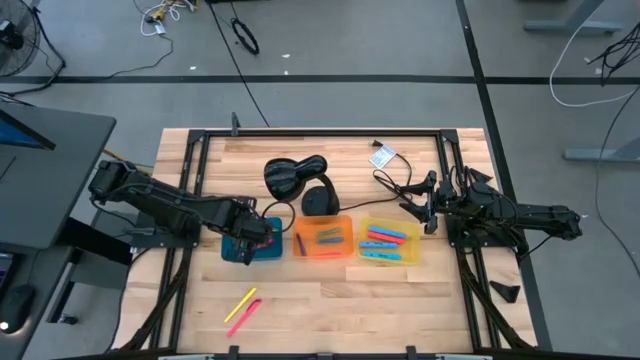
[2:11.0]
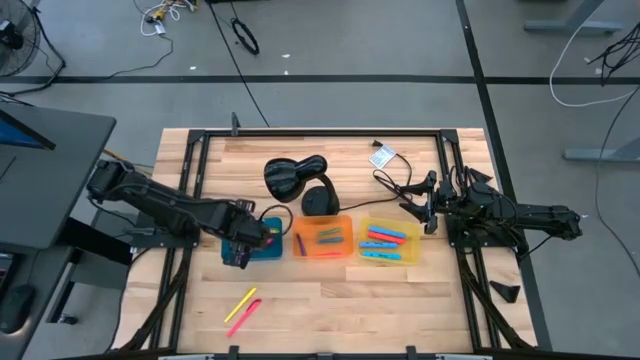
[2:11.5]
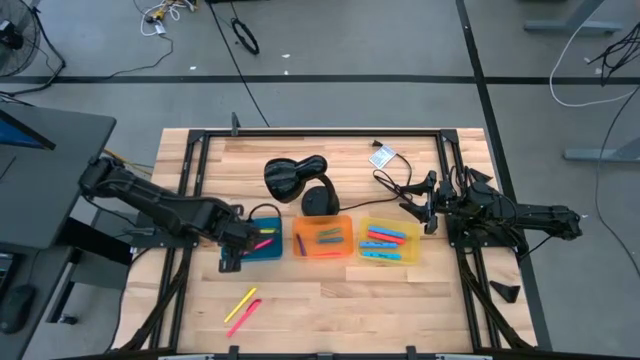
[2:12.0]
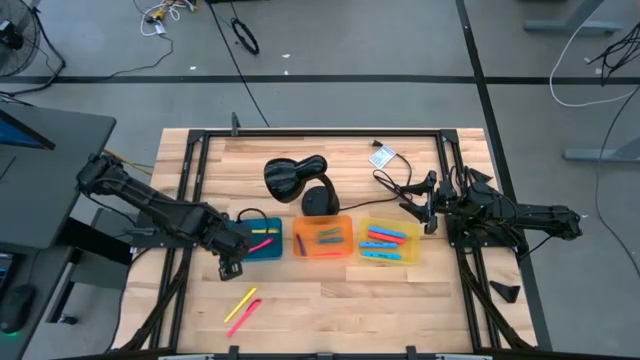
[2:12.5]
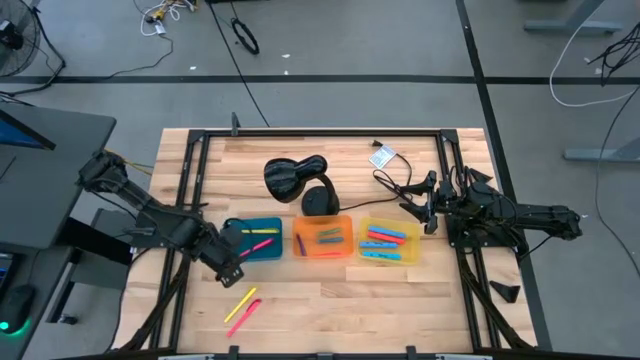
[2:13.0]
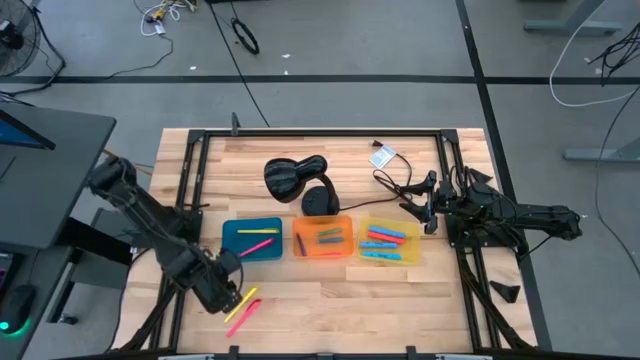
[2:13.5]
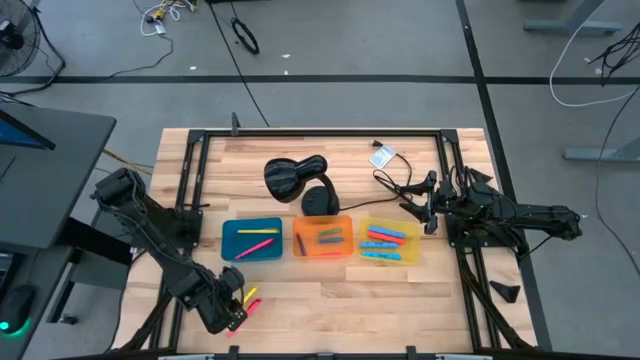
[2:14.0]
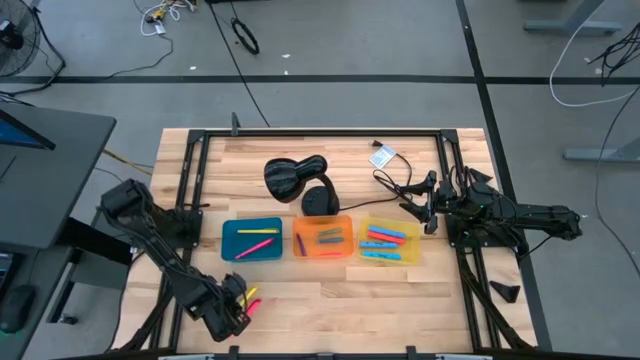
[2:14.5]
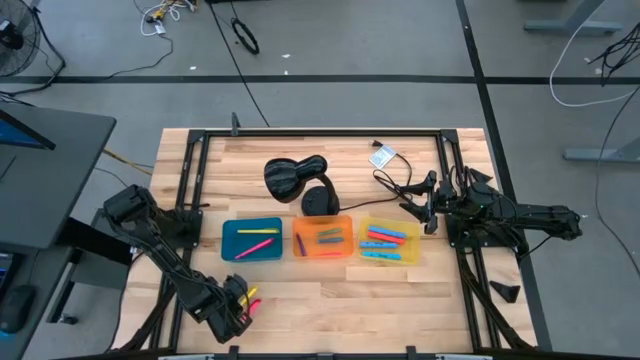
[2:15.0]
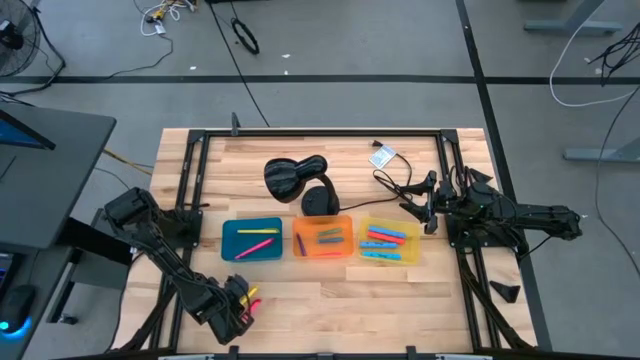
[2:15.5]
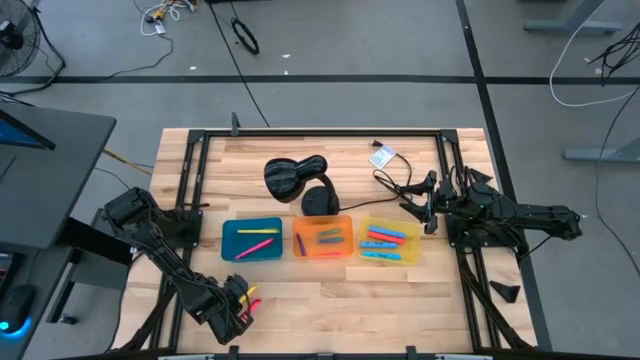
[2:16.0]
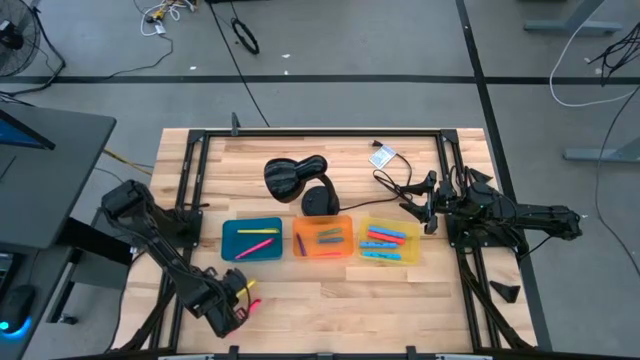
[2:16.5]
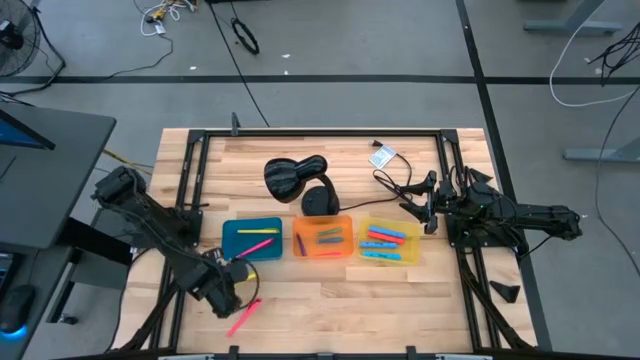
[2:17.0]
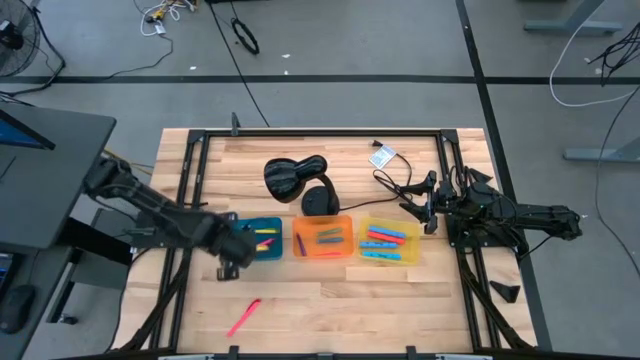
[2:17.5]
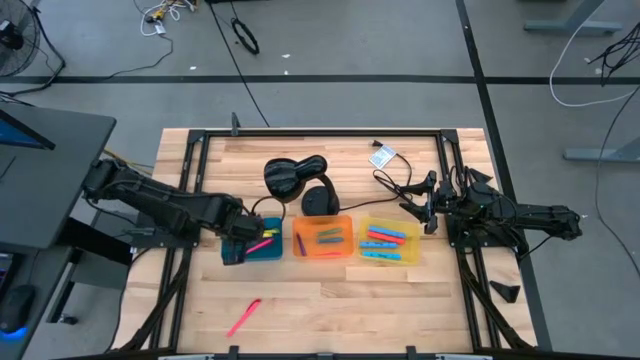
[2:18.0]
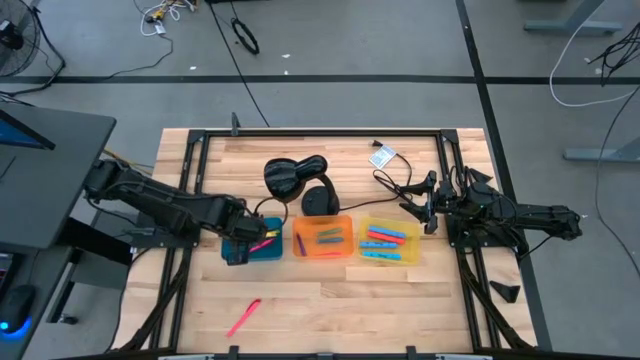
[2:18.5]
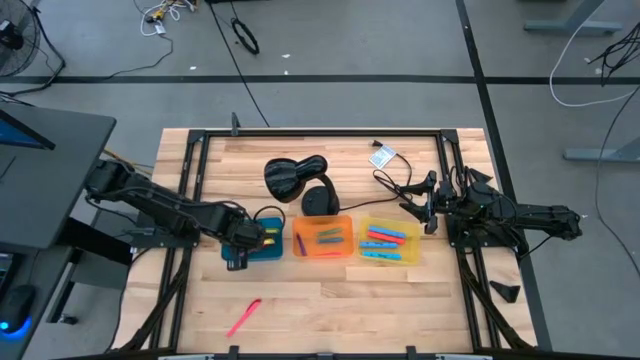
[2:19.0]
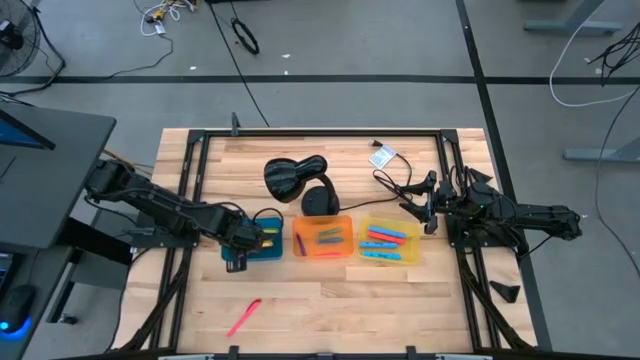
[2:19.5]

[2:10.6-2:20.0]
Task: Pick & Place Markers
Put the yellow pen into the blue bin

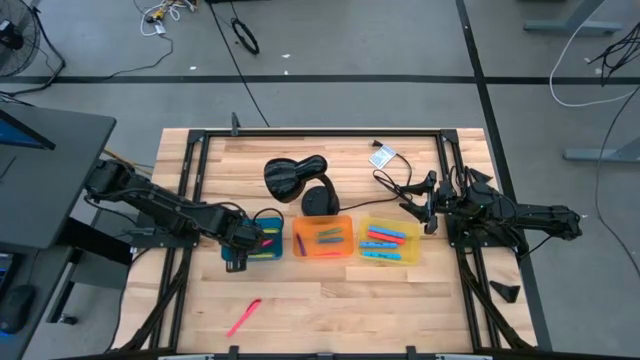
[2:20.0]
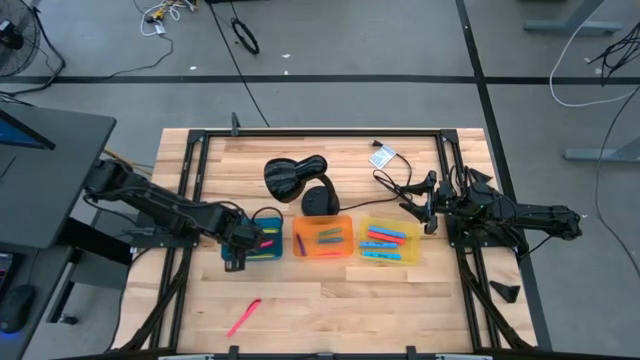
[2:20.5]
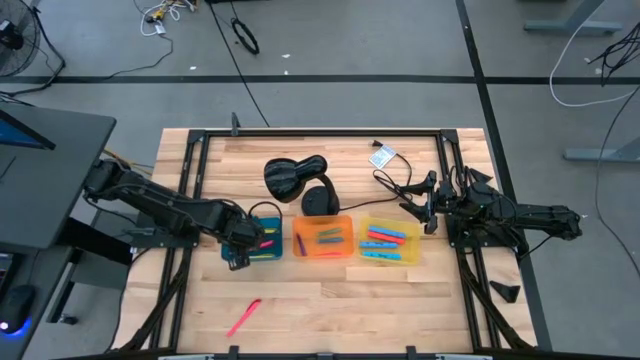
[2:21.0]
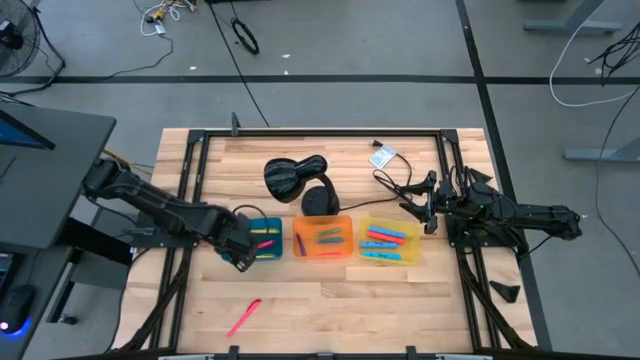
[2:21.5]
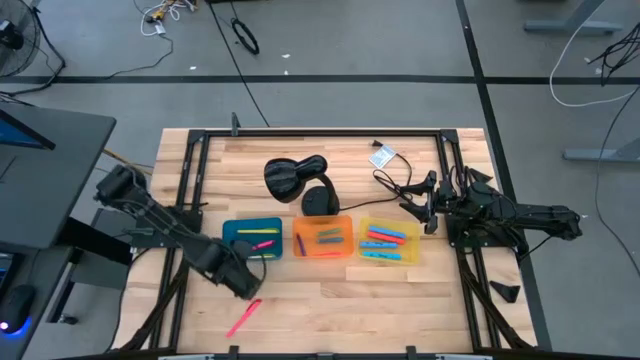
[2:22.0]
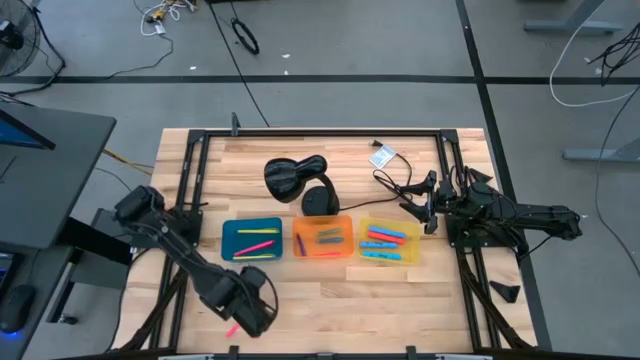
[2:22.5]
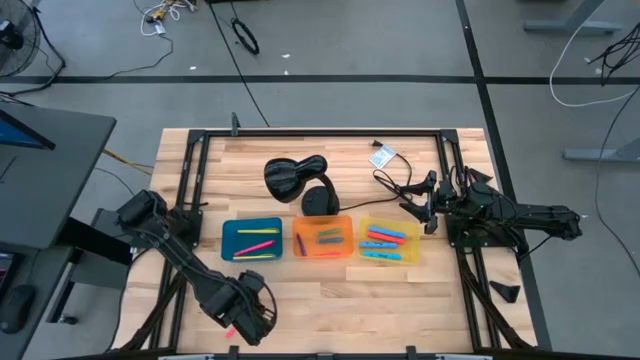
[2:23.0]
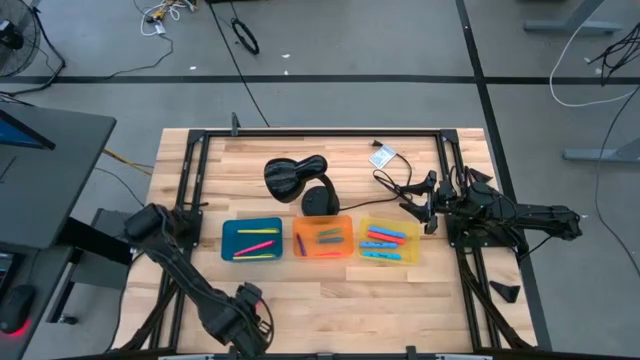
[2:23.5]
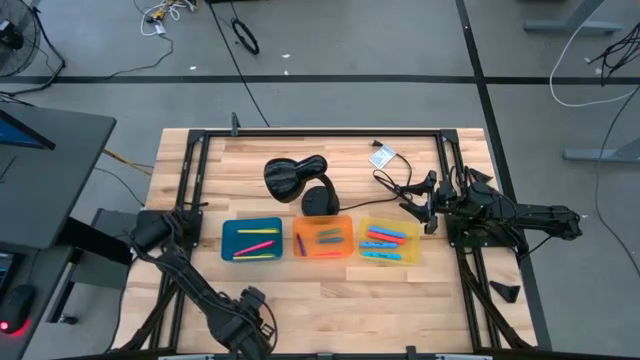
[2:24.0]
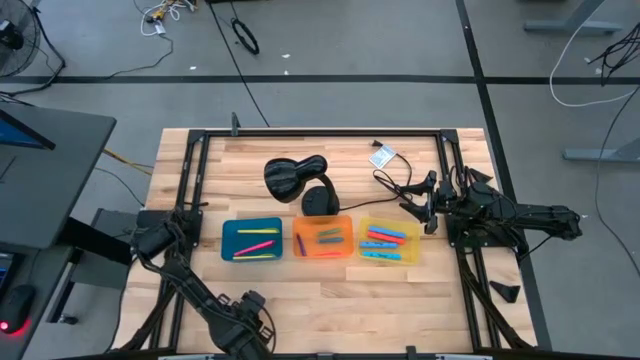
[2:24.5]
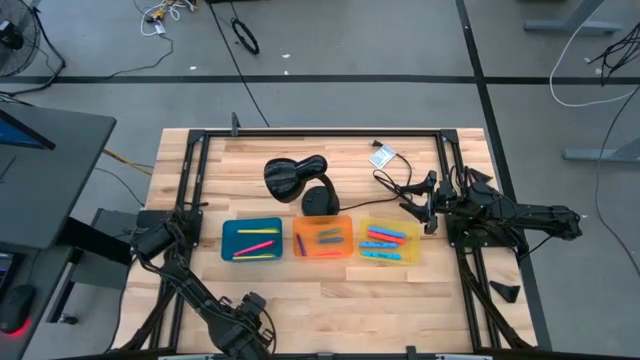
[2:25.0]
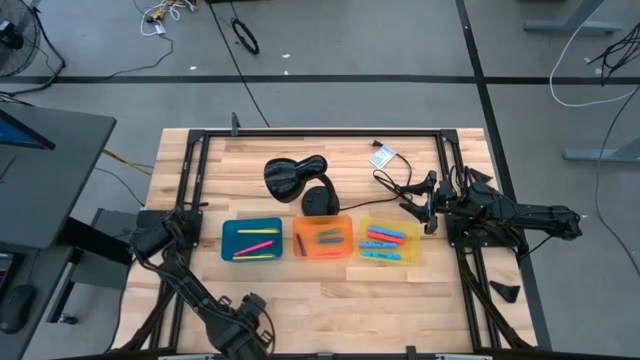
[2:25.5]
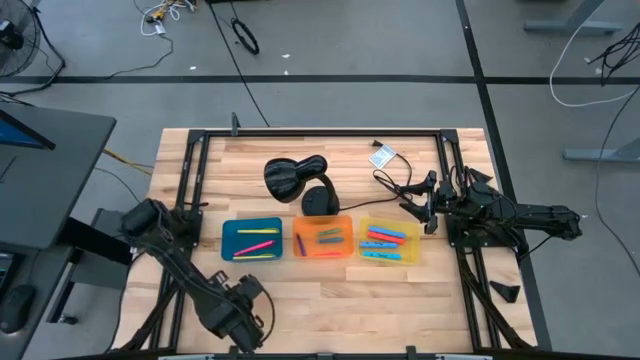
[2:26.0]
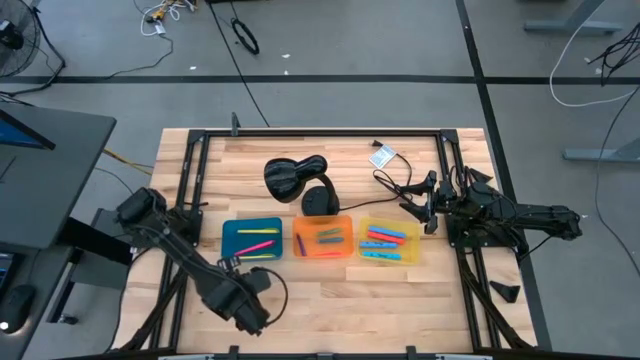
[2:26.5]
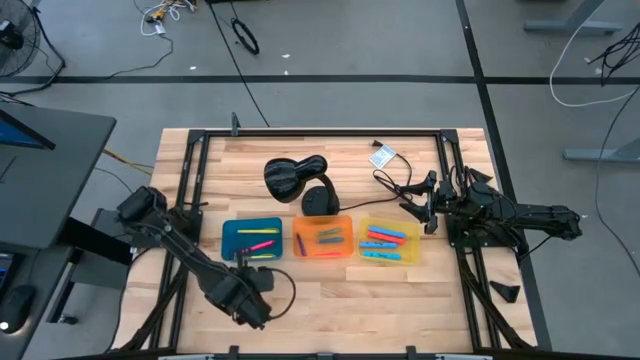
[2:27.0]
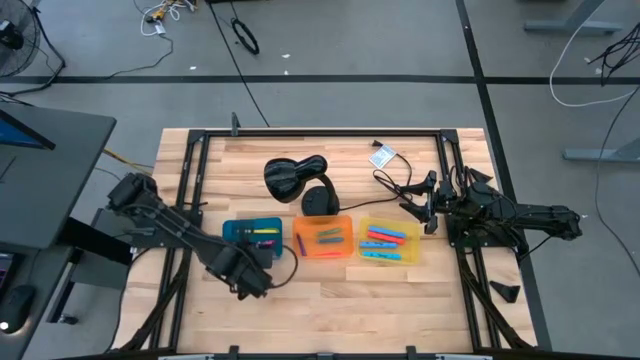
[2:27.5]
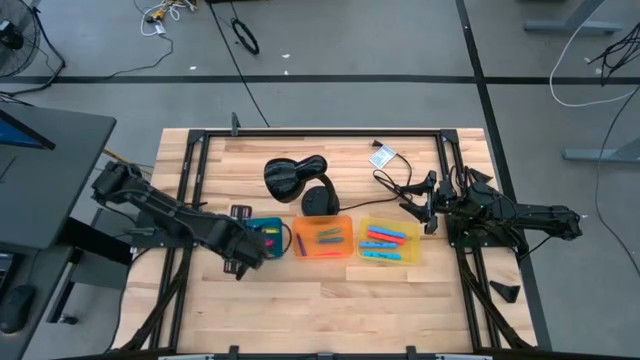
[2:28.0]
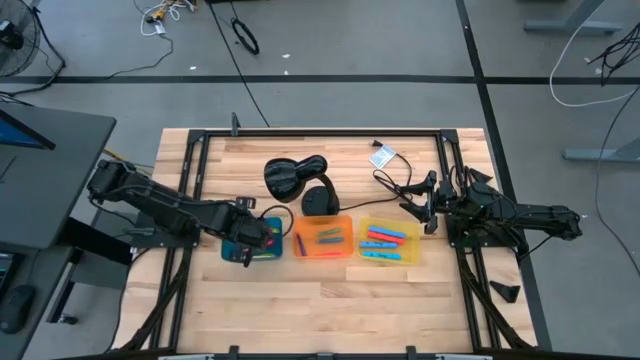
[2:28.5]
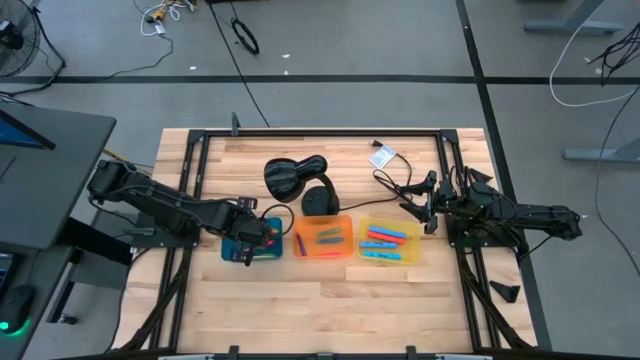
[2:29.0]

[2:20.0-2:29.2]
Put the pink pen into the blue bin

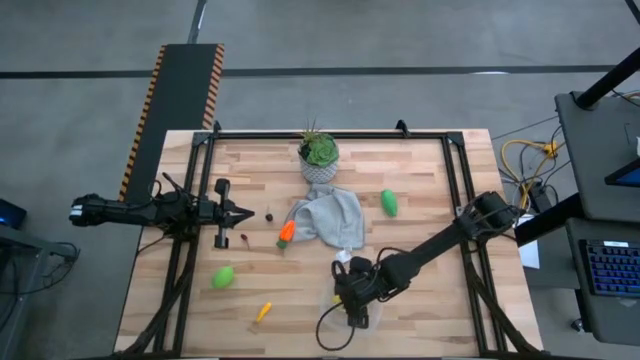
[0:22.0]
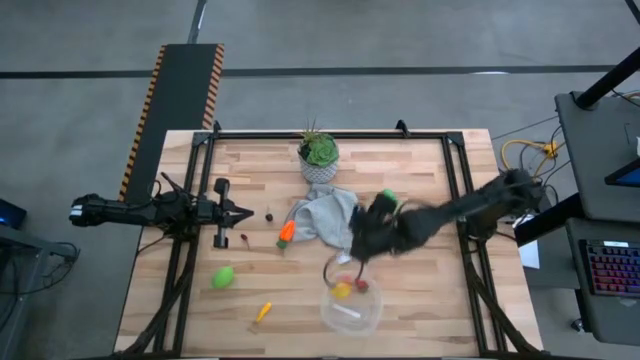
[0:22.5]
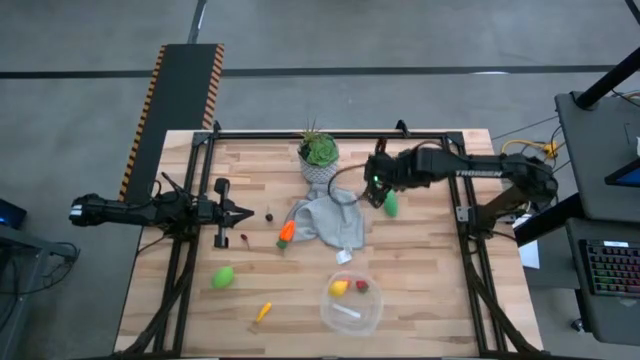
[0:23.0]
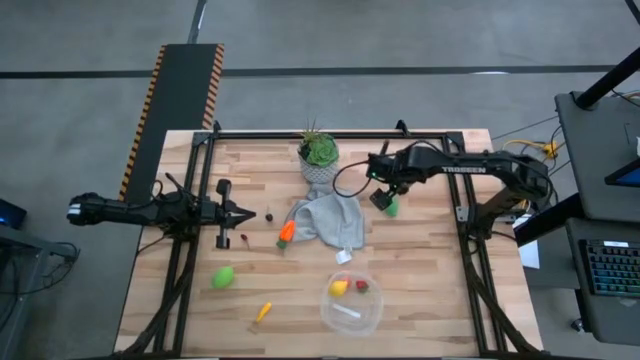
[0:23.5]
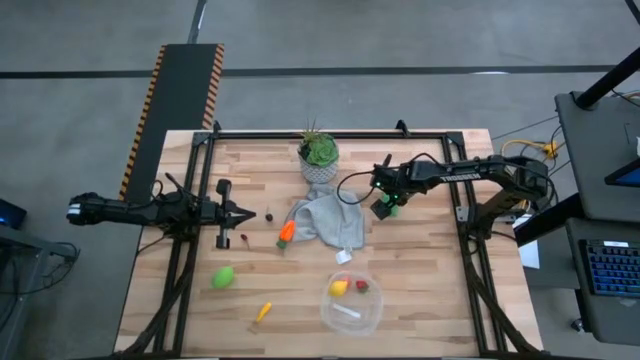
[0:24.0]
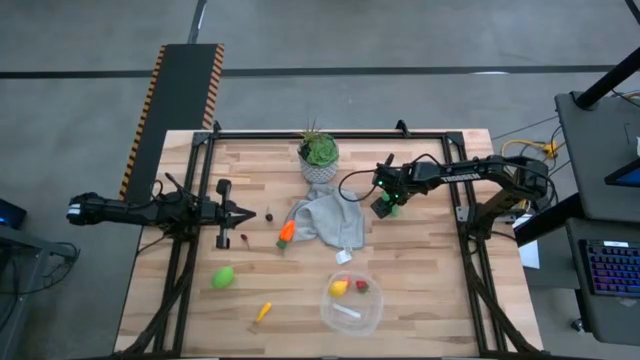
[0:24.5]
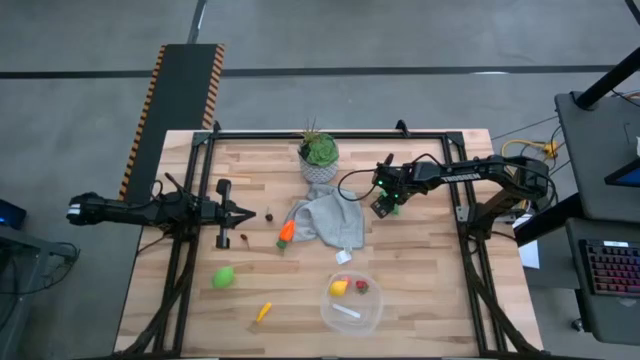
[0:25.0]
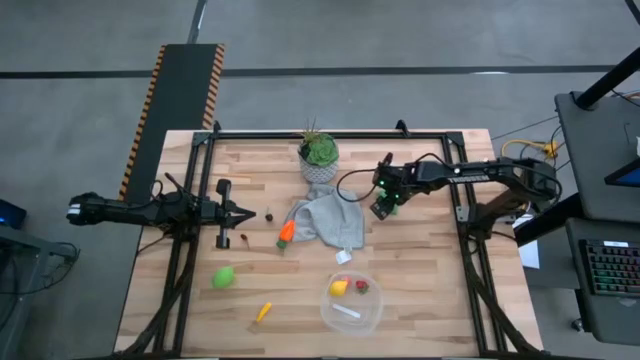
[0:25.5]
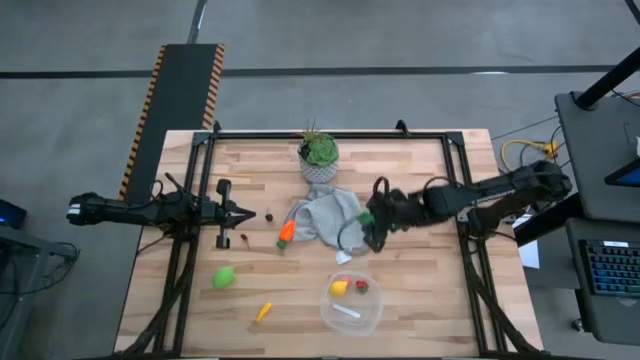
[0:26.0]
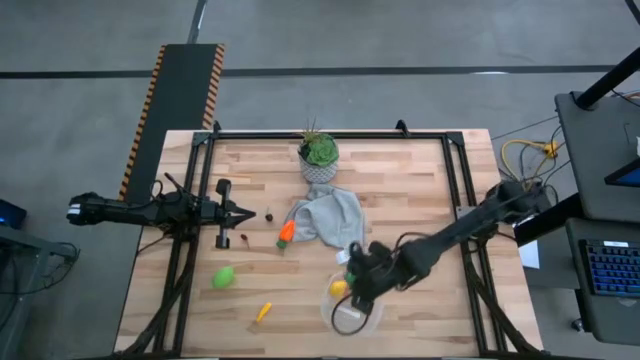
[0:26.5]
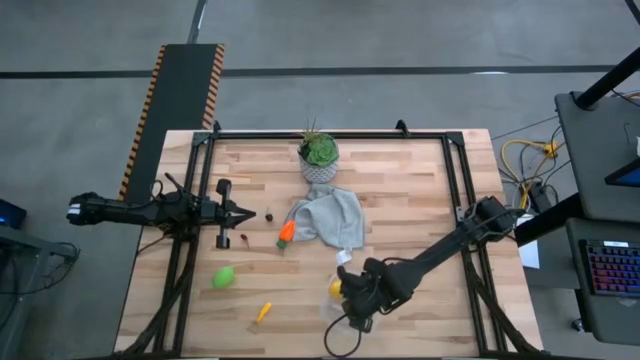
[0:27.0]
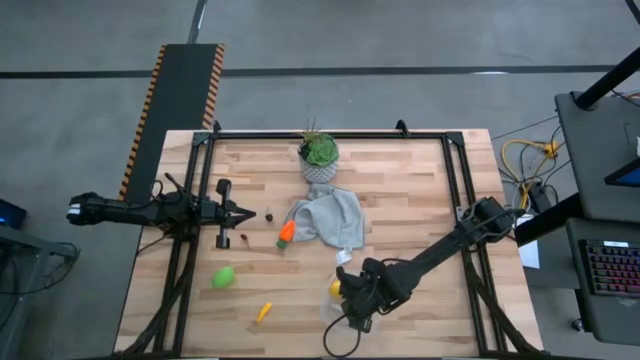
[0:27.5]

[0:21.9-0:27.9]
Task: Pick and placing Produce into tupperware
Put the sweetcorn into the transparent bin
